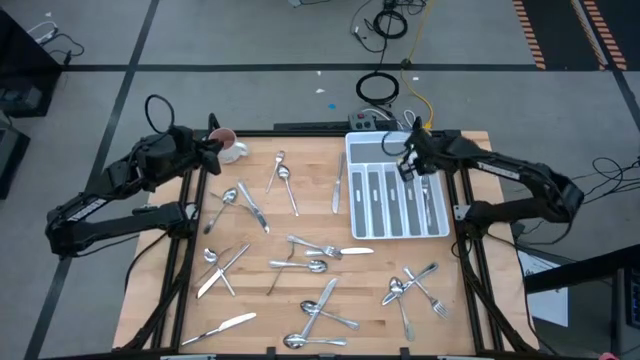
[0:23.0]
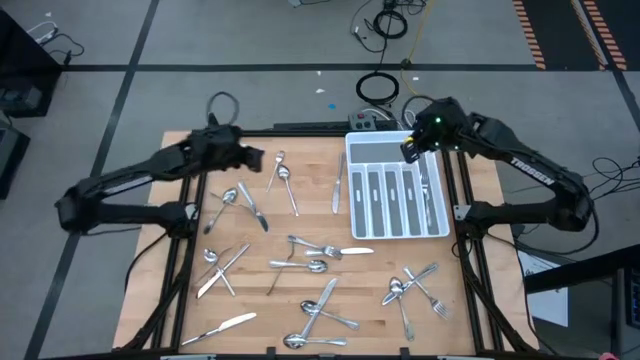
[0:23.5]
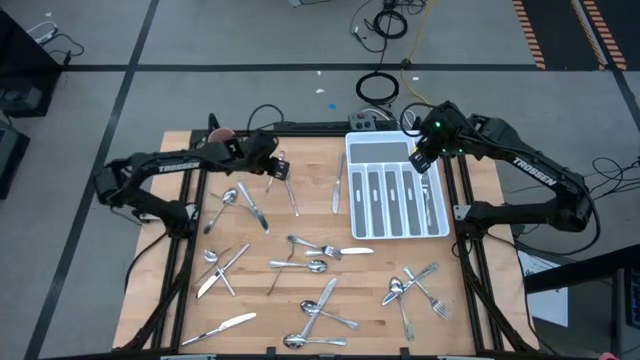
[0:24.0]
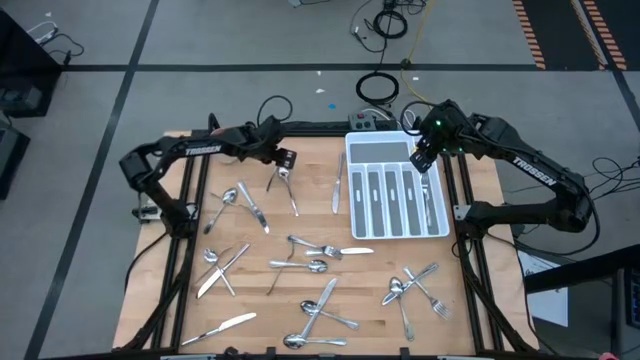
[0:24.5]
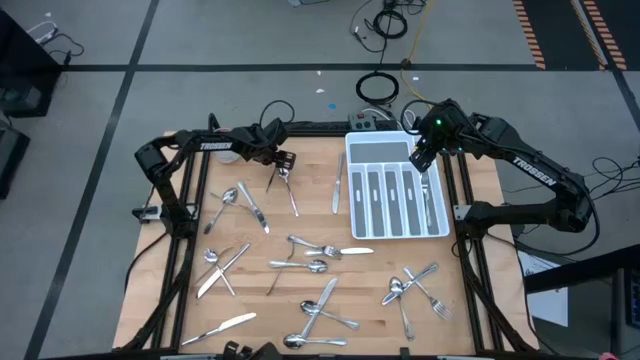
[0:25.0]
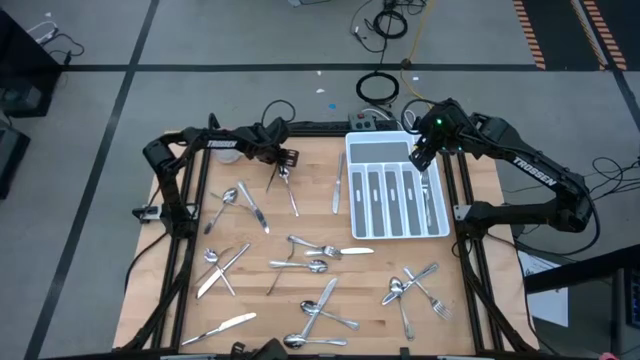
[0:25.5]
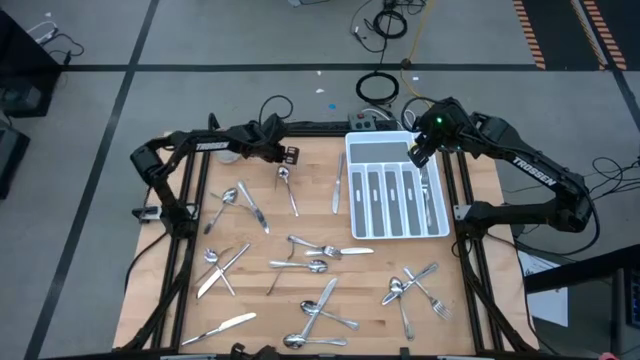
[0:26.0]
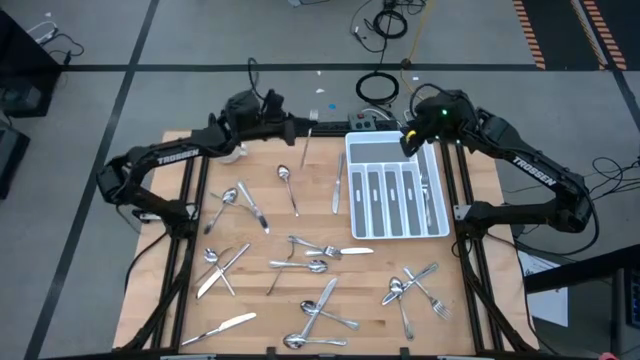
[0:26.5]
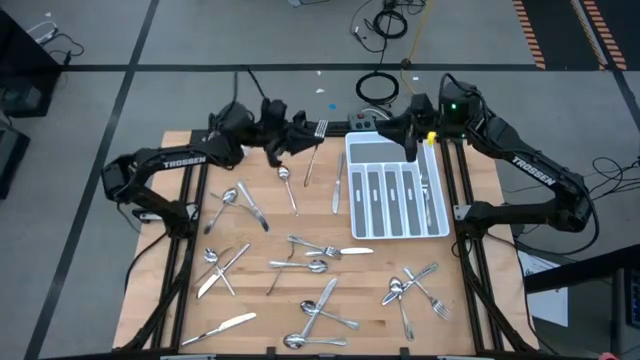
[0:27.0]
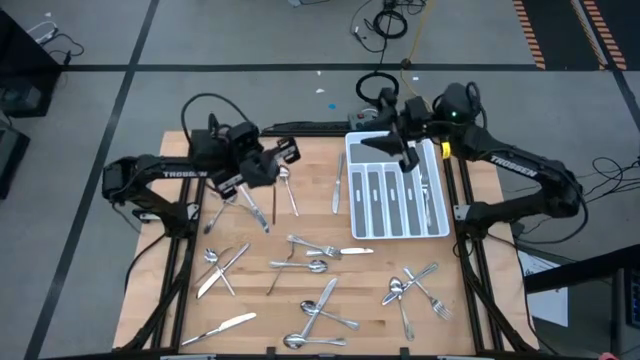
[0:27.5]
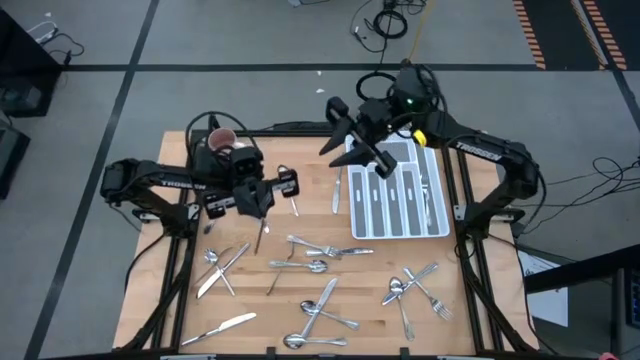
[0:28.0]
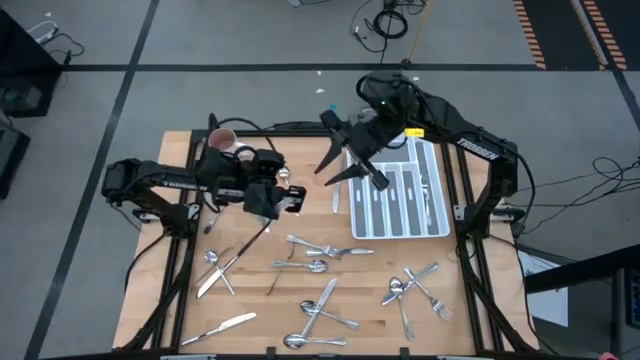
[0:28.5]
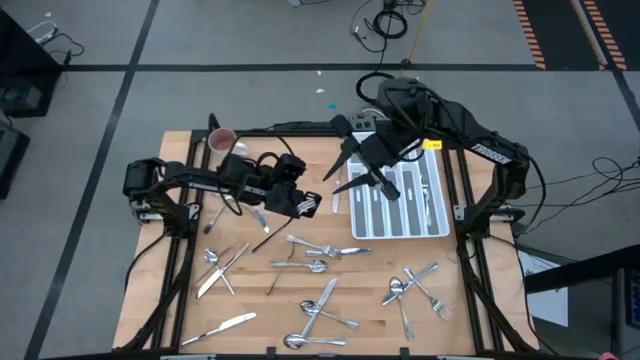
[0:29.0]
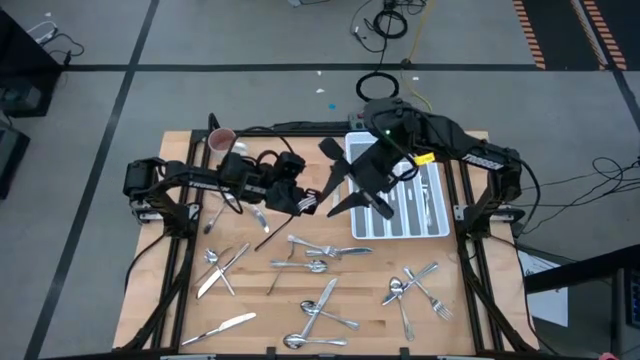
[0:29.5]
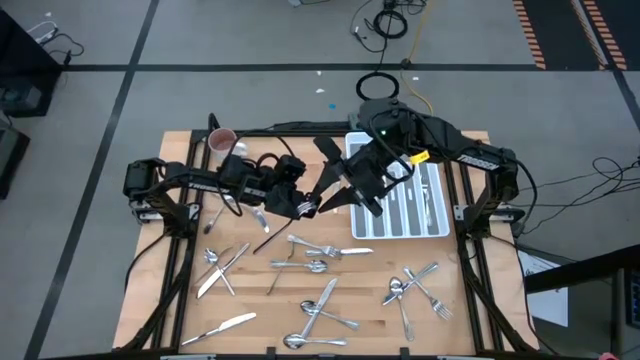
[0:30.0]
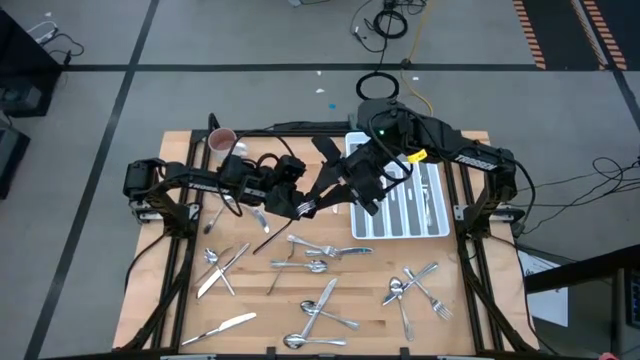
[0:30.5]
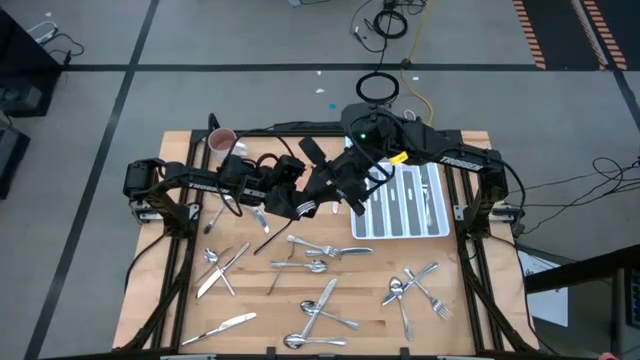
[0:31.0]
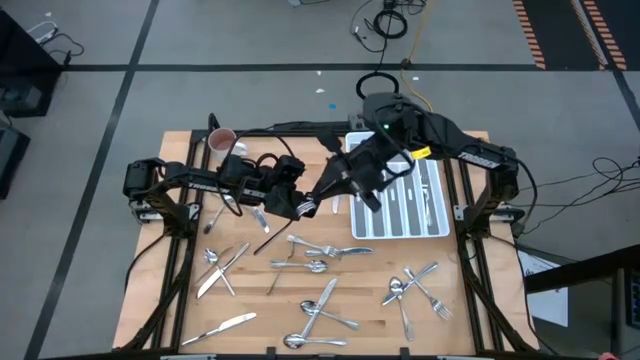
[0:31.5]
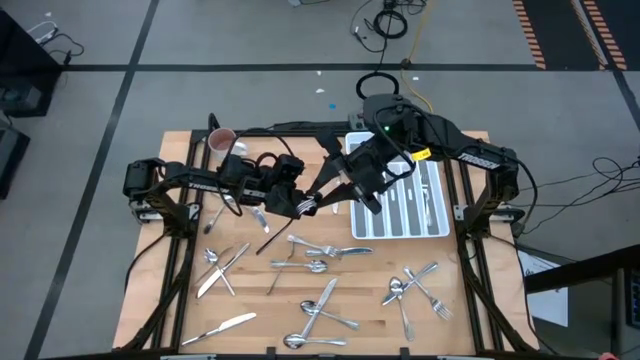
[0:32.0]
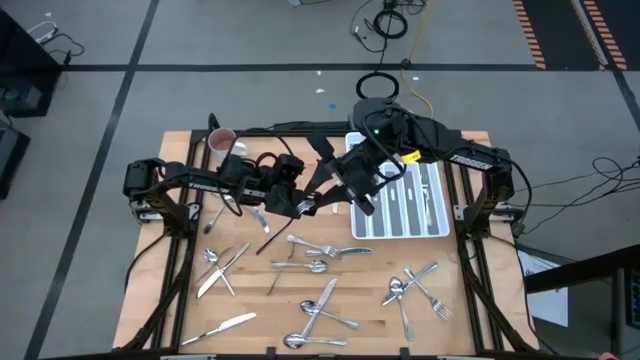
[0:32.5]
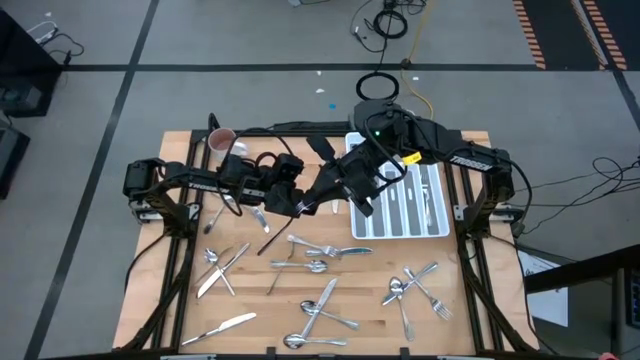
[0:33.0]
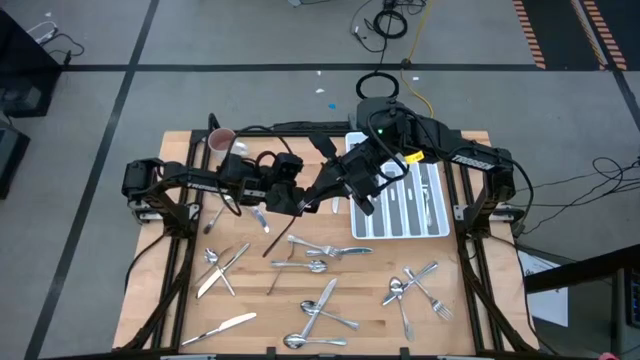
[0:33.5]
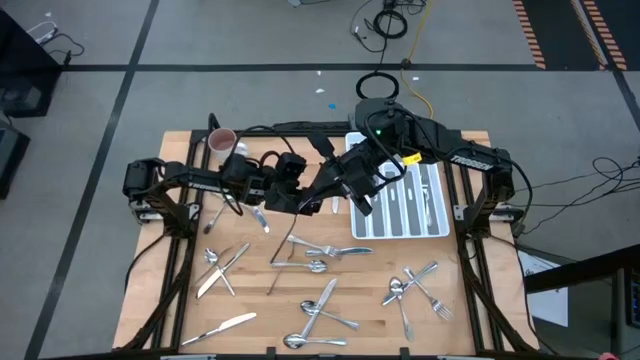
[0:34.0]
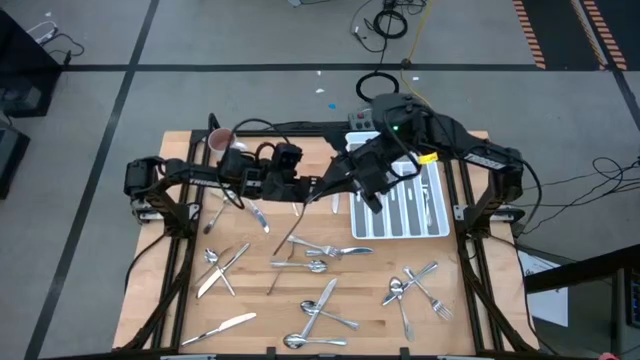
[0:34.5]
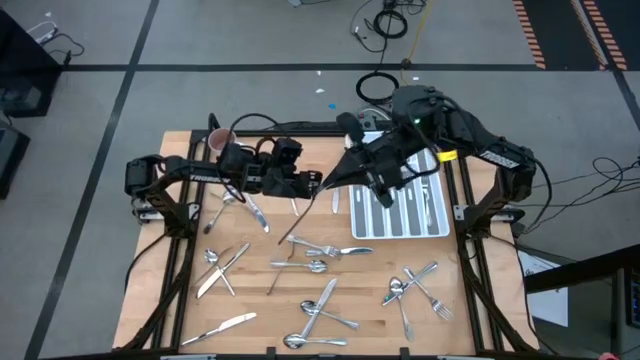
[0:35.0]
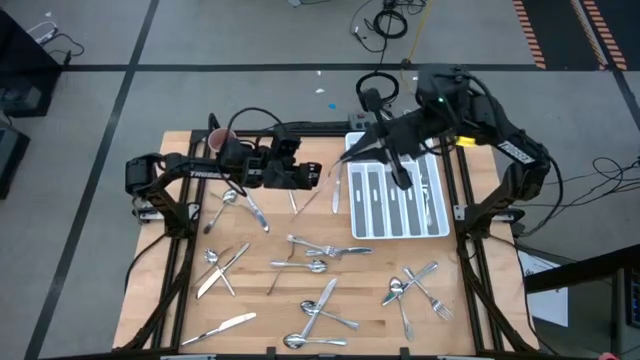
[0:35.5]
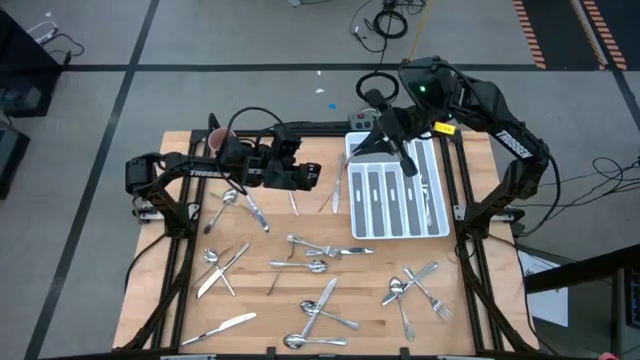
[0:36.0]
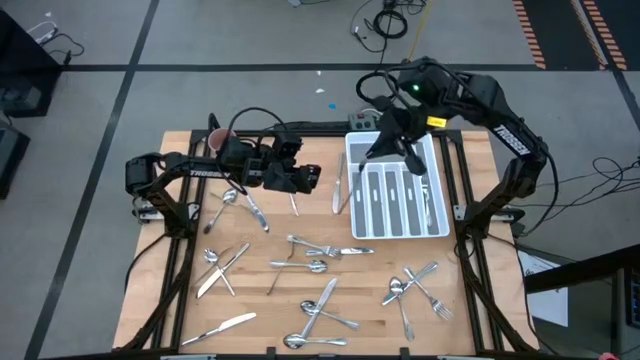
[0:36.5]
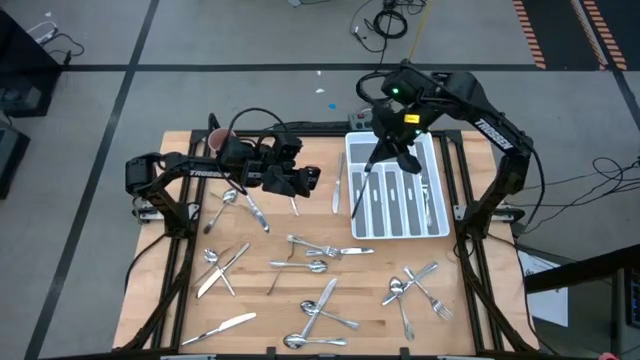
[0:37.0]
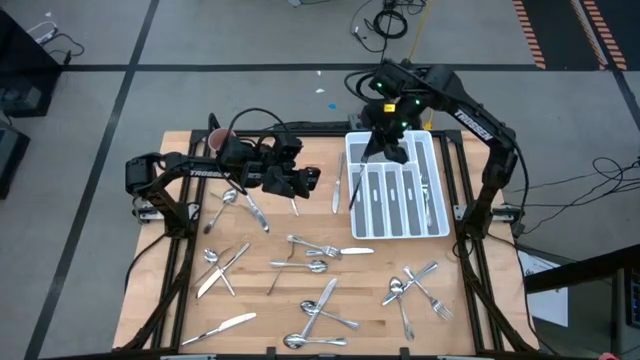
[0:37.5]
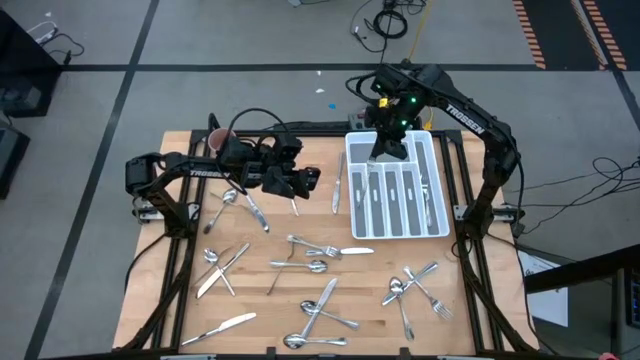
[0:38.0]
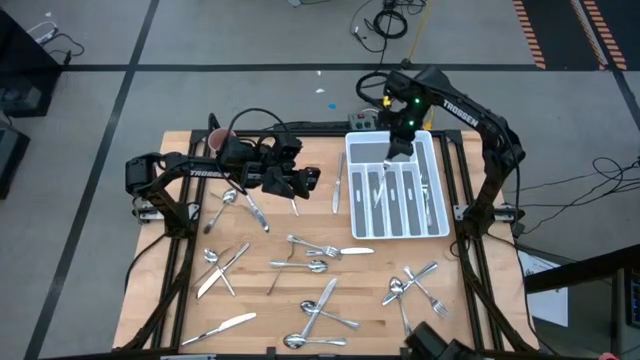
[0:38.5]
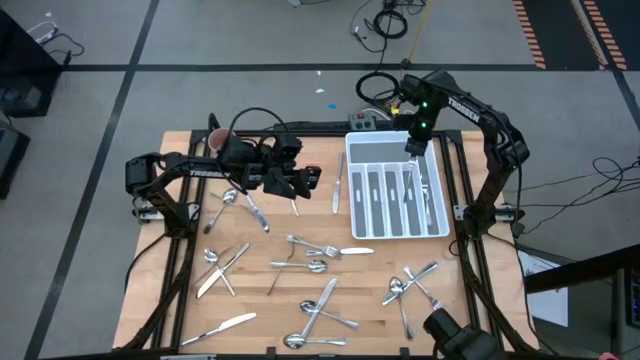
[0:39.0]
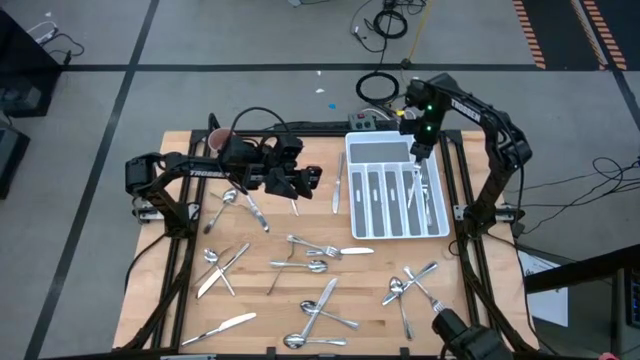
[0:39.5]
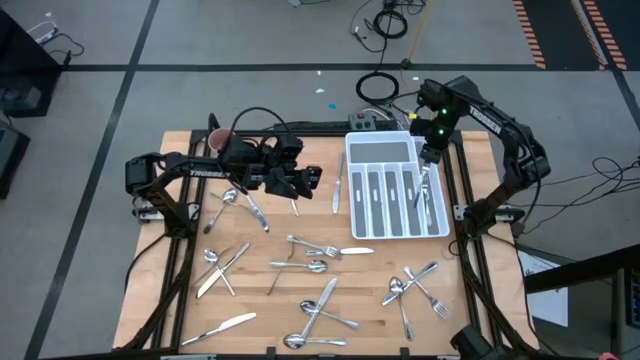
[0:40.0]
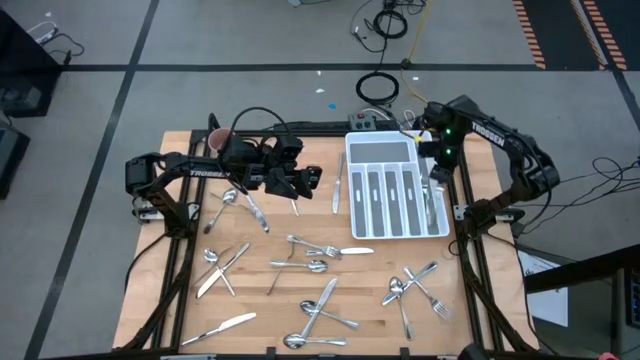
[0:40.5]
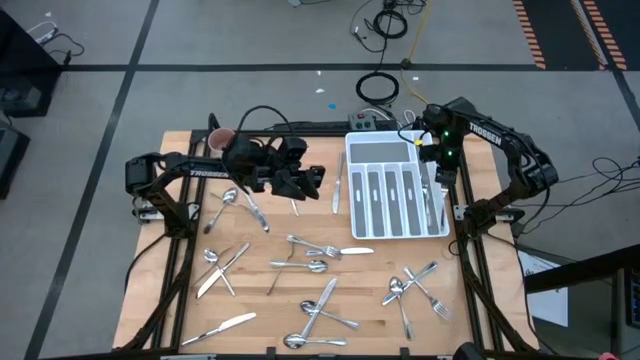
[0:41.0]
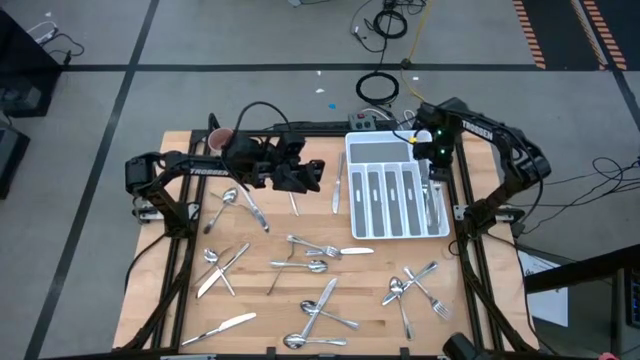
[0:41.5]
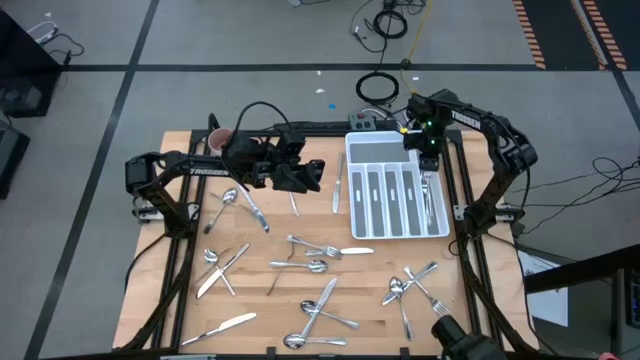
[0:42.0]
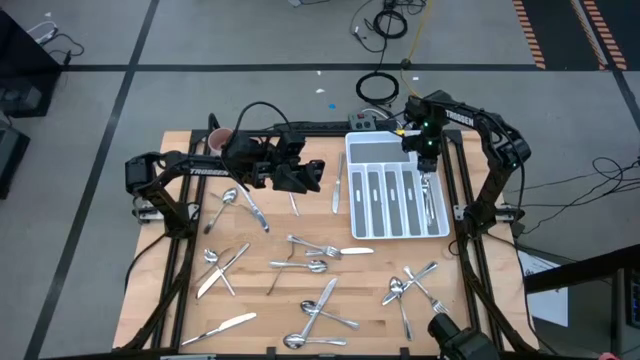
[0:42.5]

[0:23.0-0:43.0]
Task: Sort silverware
Put the fork in the right section of the silverware tray
